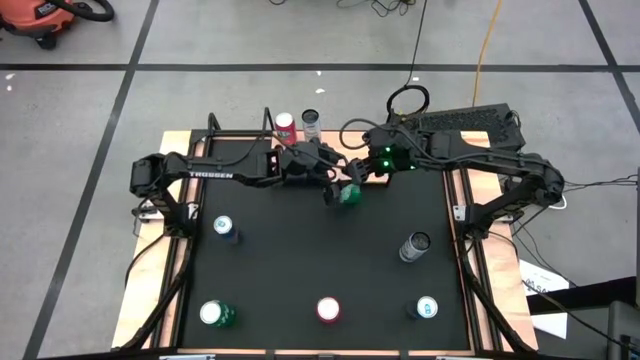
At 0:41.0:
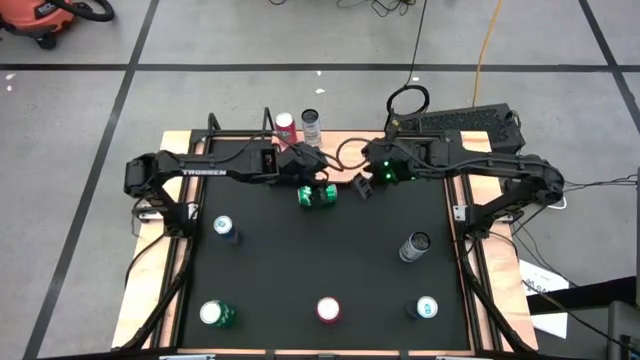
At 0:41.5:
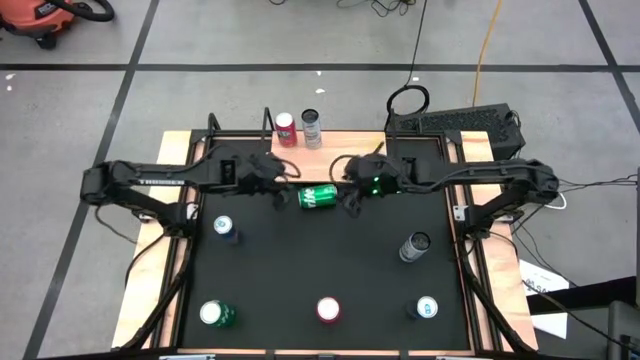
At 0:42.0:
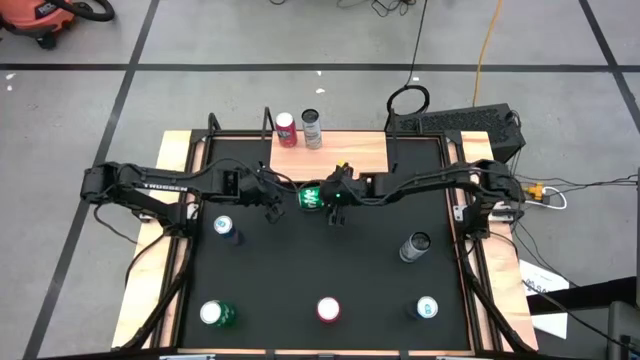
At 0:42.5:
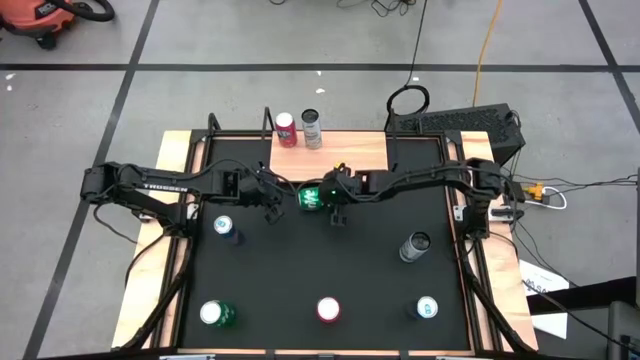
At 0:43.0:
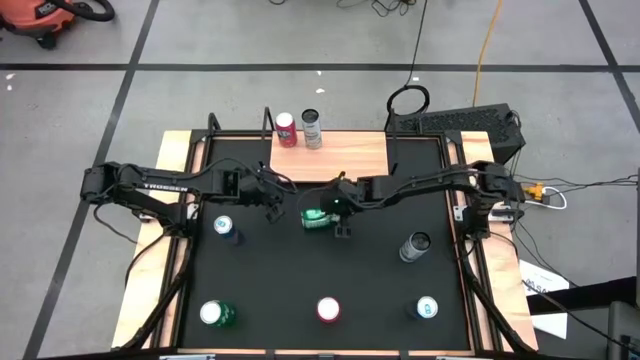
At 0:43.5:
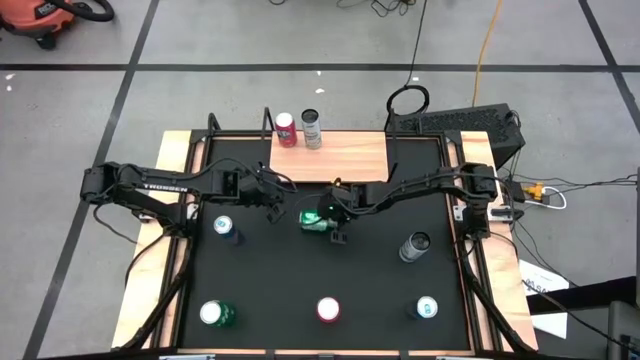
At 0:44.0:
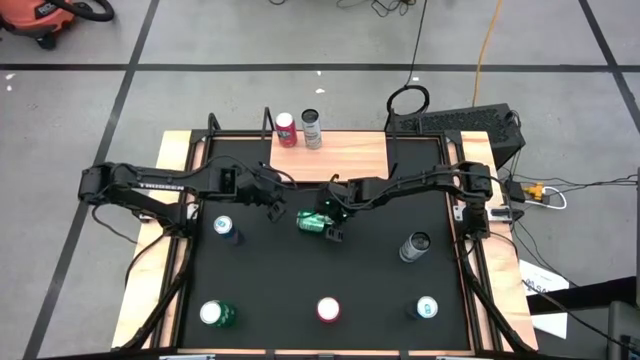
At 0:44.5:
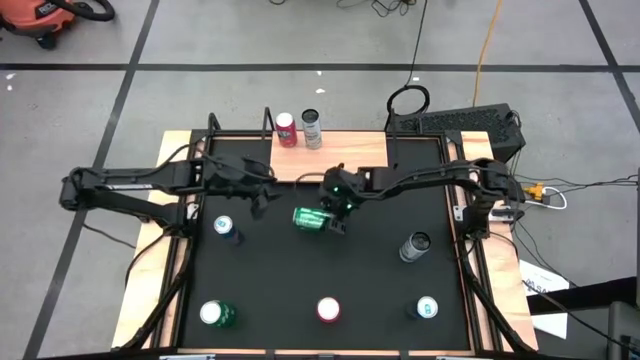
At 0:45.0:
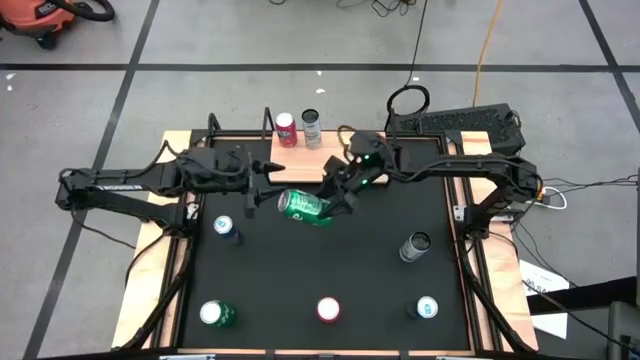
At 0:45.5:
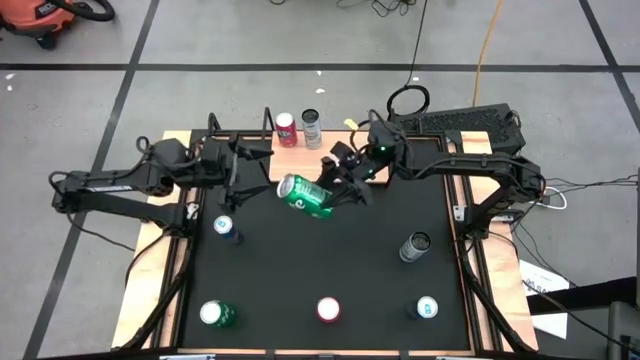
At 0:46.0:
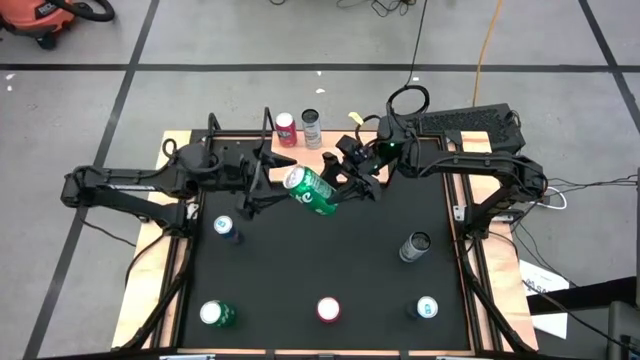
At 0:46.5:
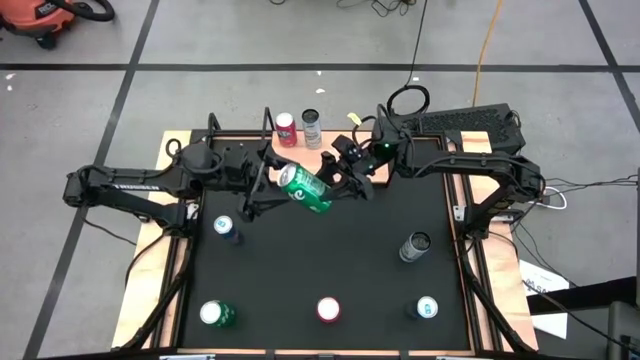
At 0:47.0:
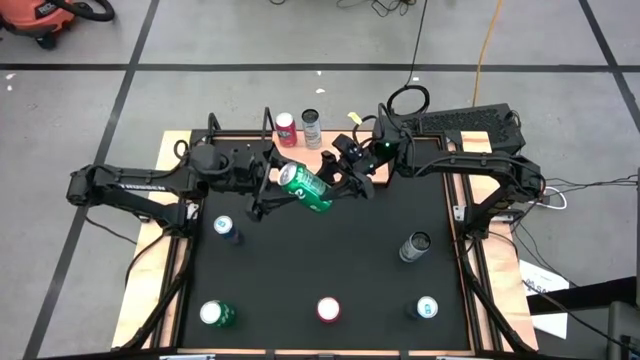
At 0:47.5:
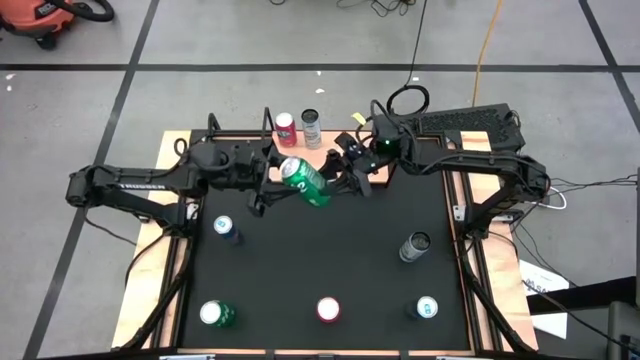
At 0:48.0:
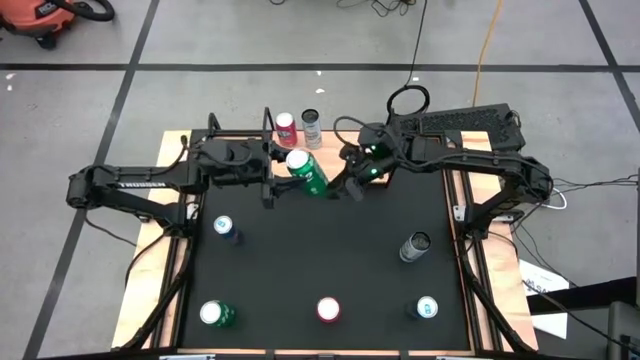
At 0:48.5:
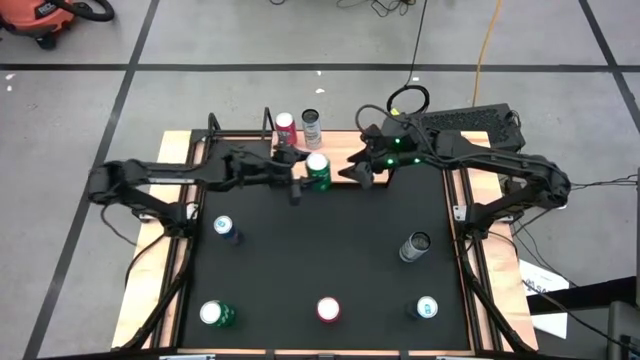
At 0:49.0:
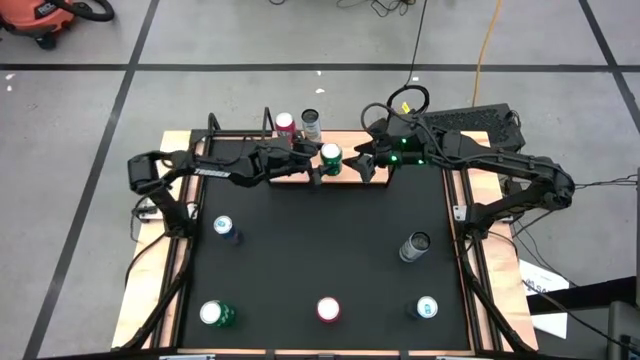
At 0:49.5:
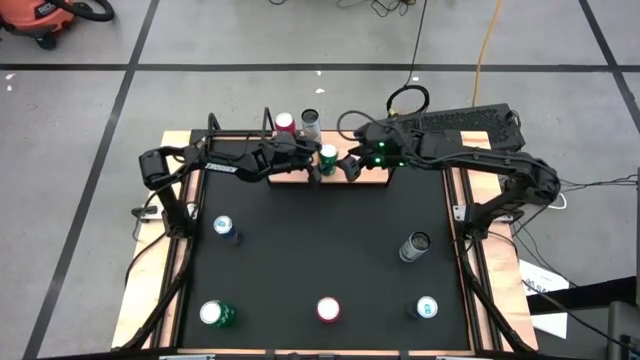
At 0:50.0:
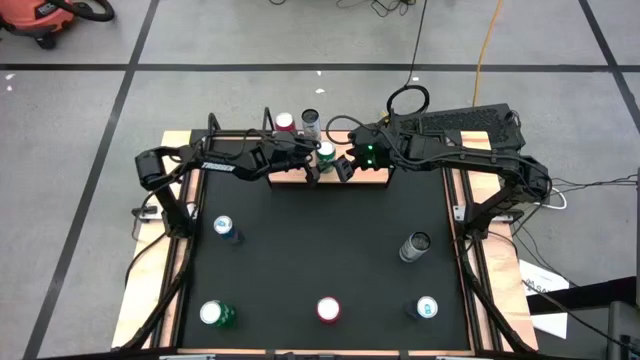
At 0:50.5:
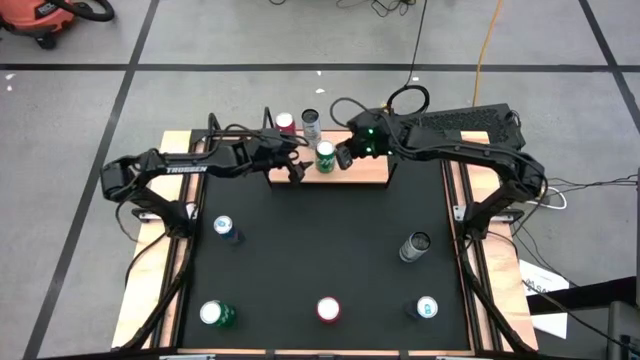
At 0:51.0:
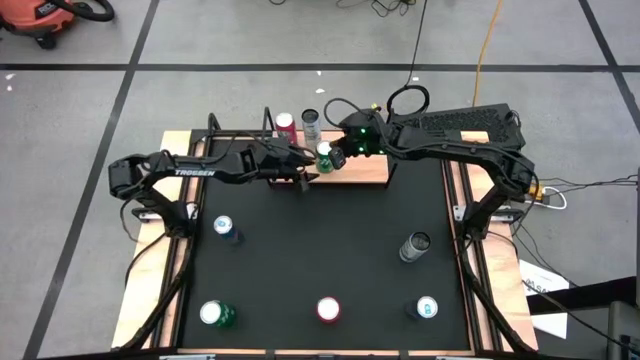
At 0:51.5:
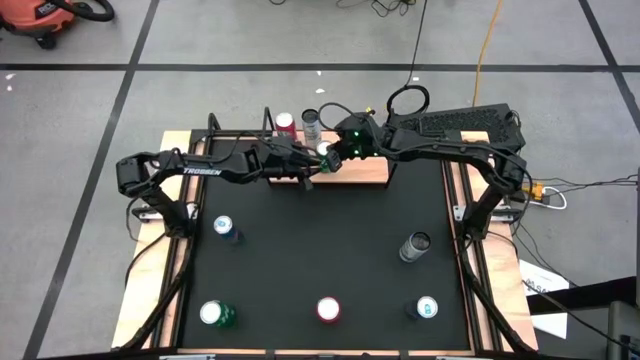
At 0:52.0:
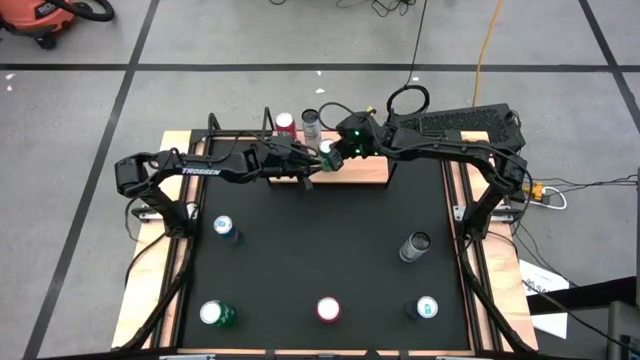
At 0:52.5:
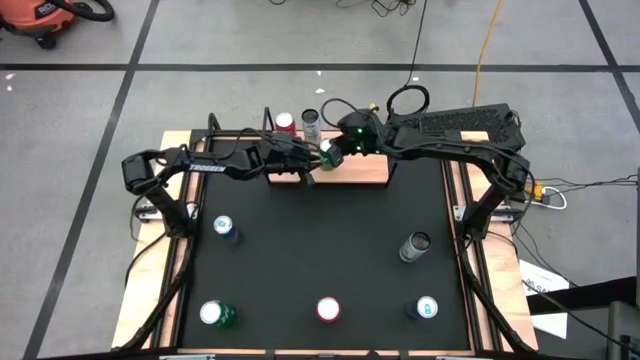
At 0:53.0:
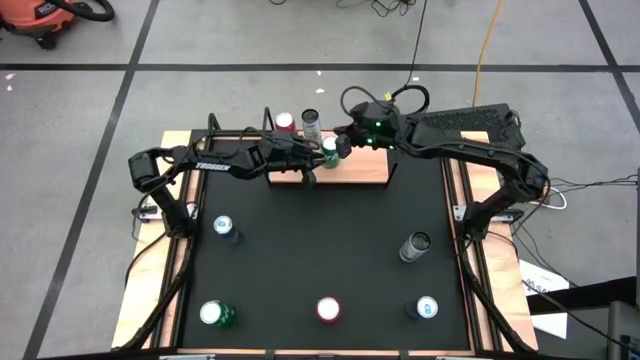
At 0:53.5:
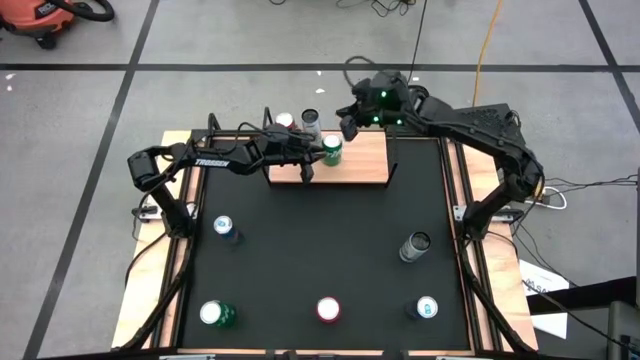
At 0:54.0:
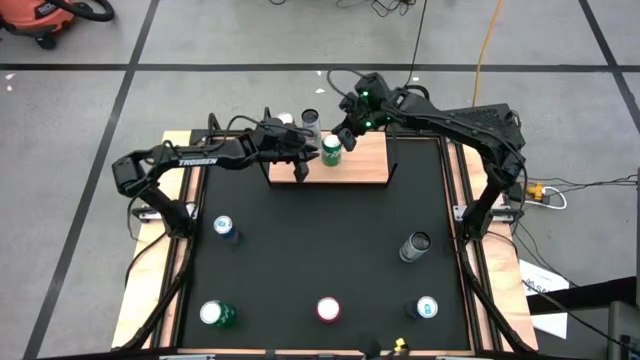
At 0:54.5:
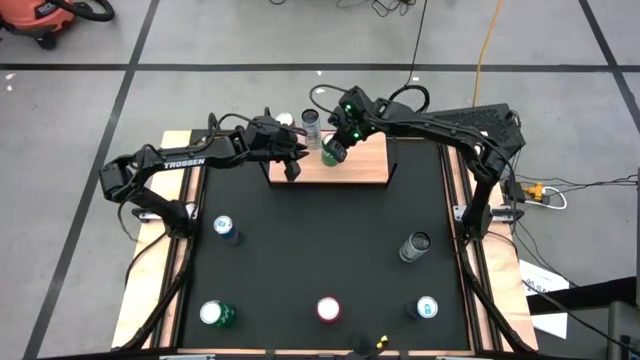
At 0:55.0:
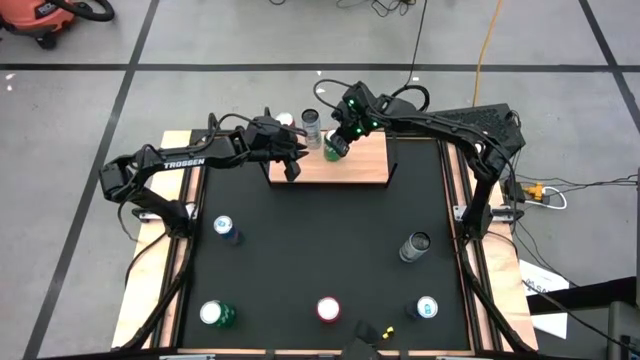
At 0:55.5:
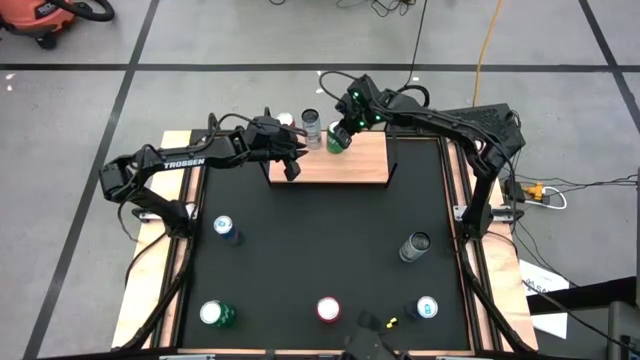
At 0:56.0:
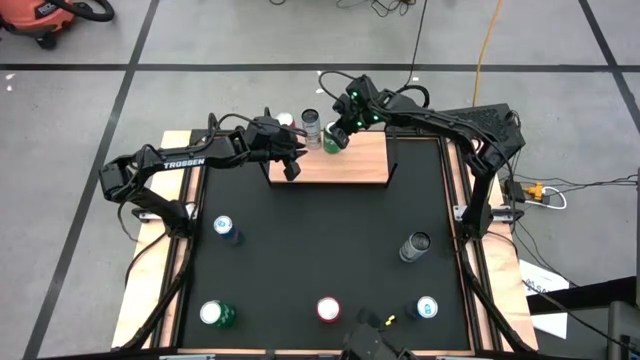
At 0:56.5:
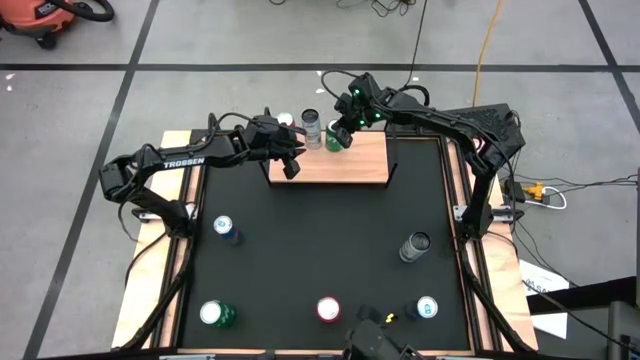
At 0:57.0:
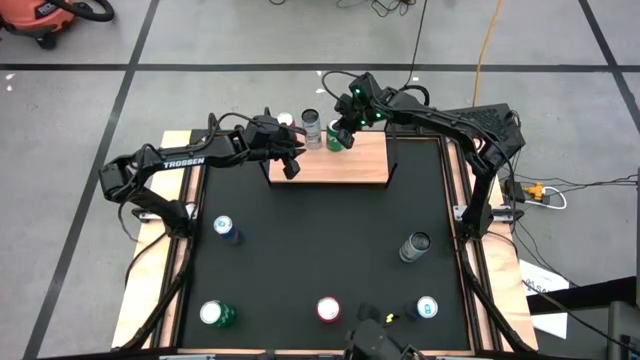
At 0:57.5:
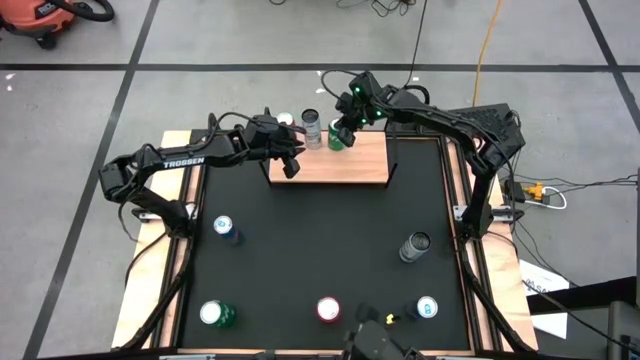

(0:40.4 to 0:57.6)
Task: Place canned beverage on shelf
Put the top green soda can on the shelf

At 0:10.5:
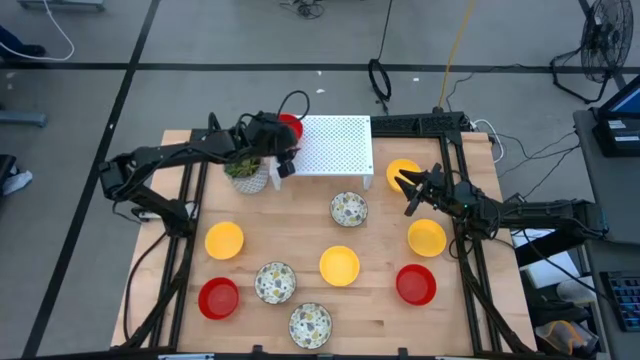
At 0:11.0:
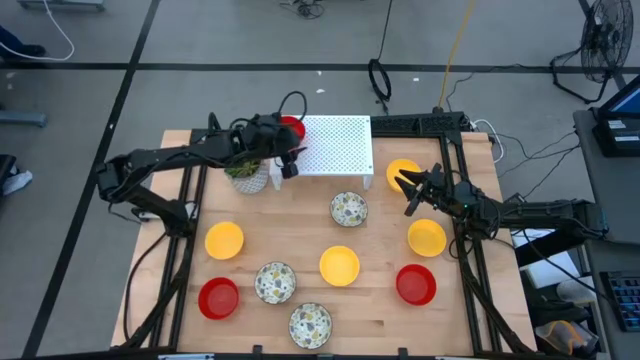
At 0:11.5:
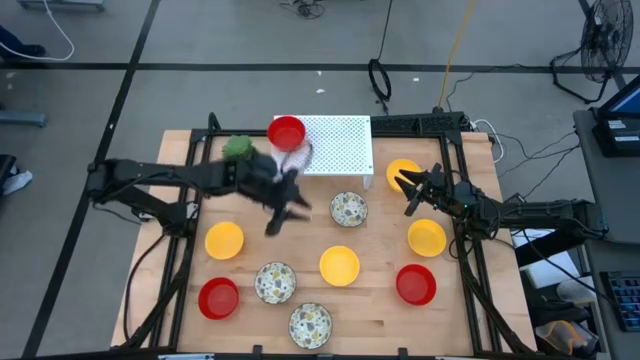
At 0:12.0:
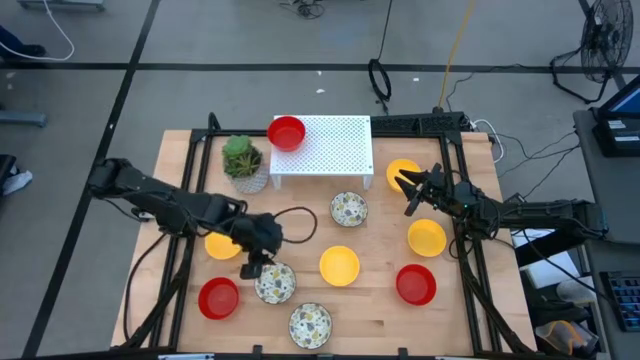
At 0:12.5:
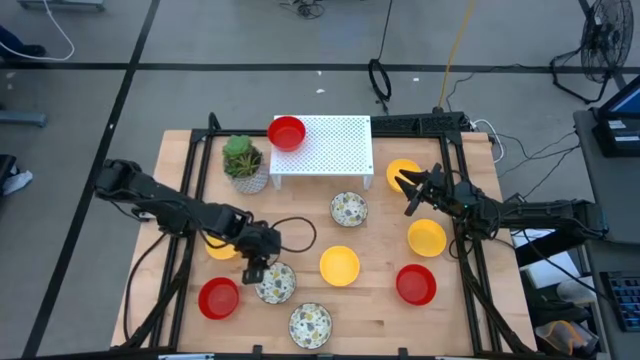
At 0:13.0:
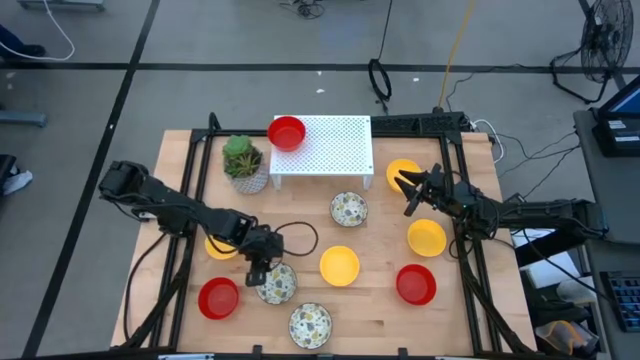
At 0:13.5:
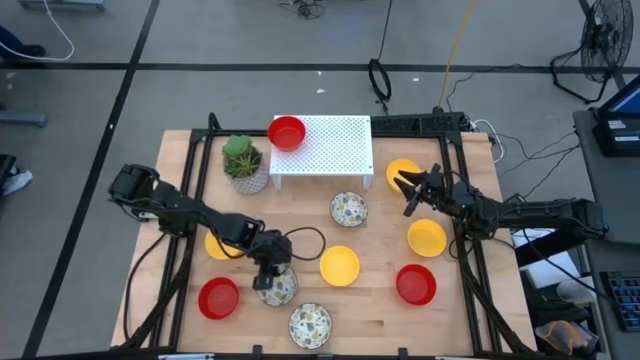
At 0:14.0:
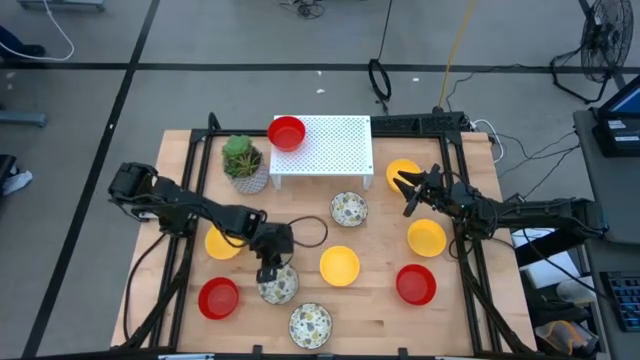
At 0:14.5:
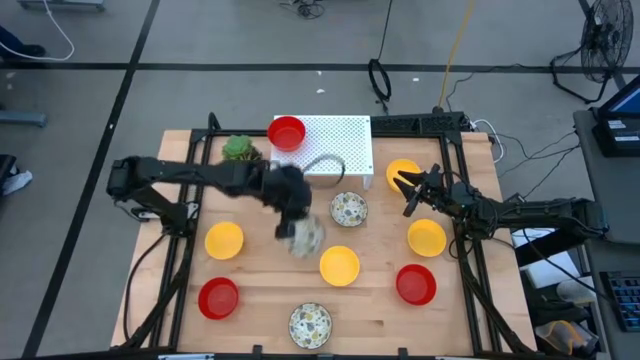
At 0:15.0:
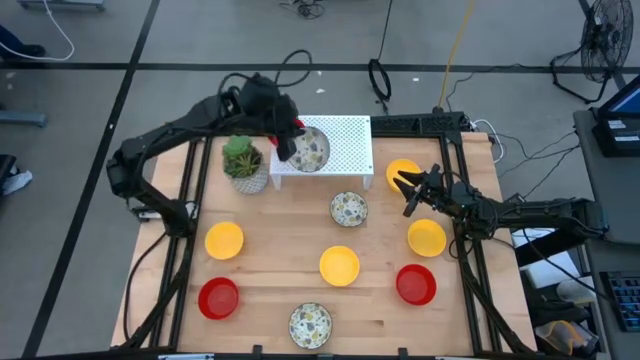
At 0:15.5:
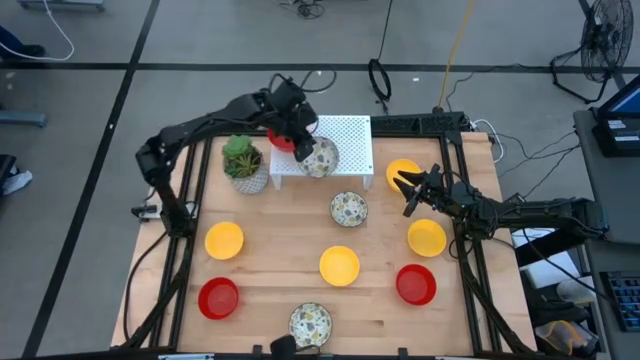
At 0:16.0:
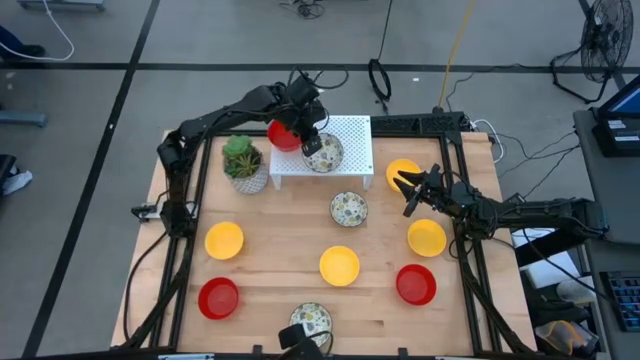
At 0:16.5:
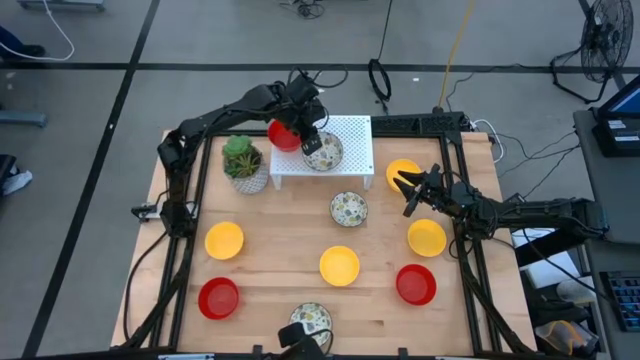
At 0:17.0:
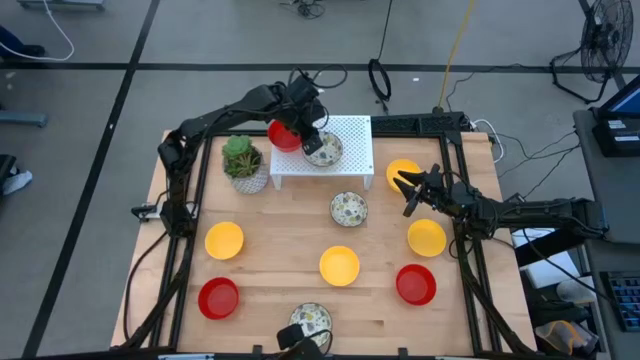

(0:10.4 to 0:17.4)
Task: Pick & Place Mini bowls
Put the white patterned bowl on the shelf
